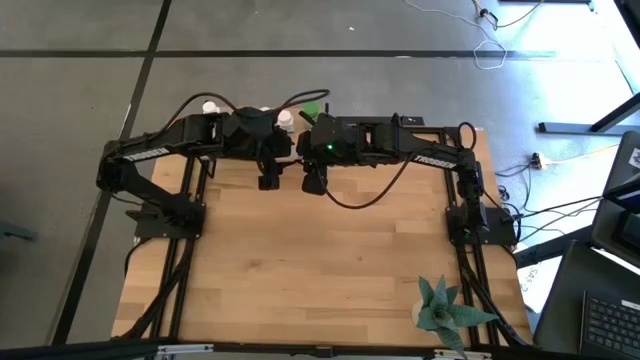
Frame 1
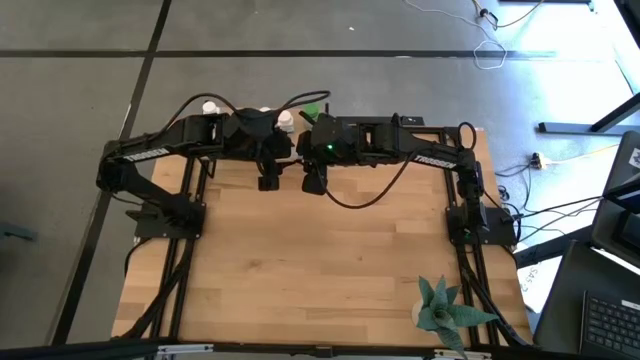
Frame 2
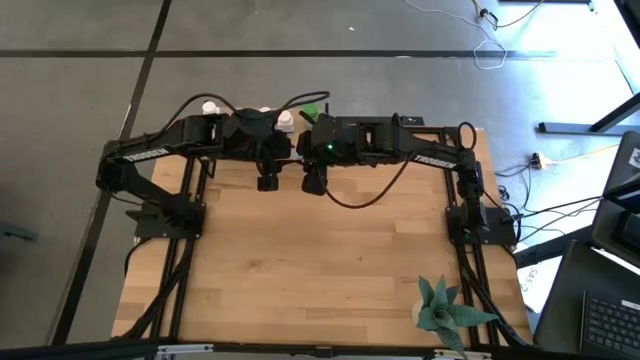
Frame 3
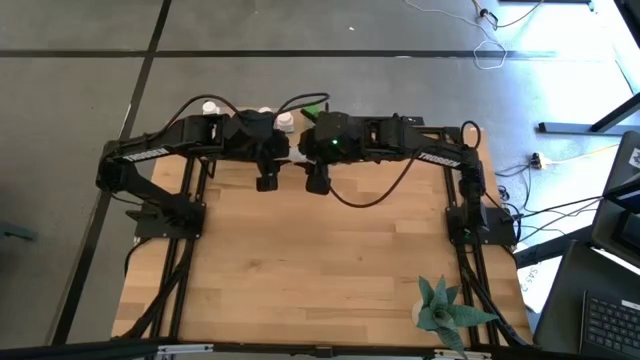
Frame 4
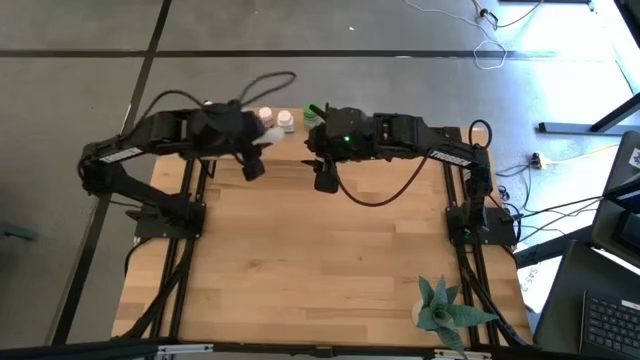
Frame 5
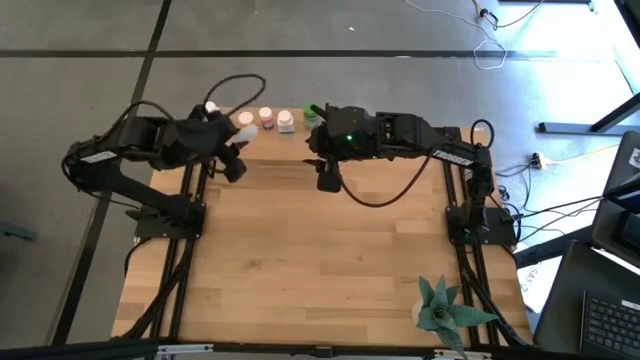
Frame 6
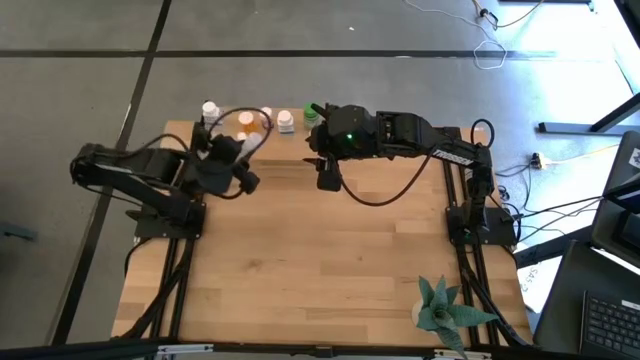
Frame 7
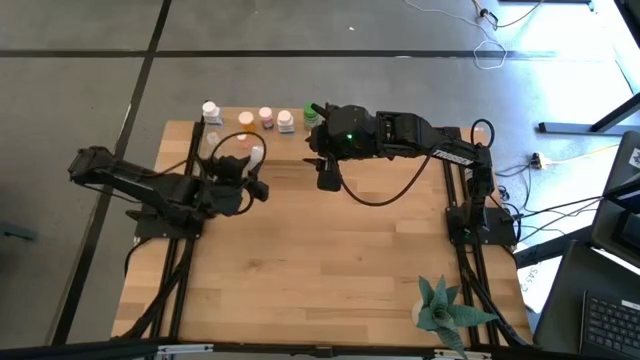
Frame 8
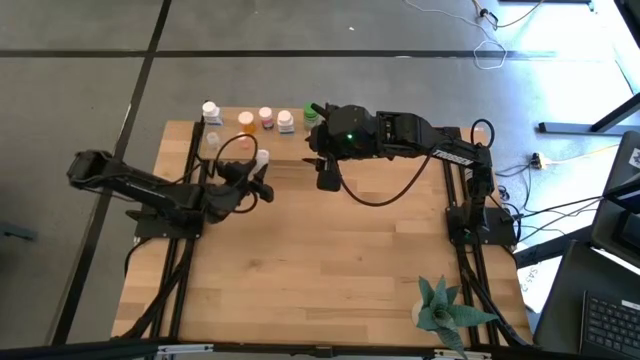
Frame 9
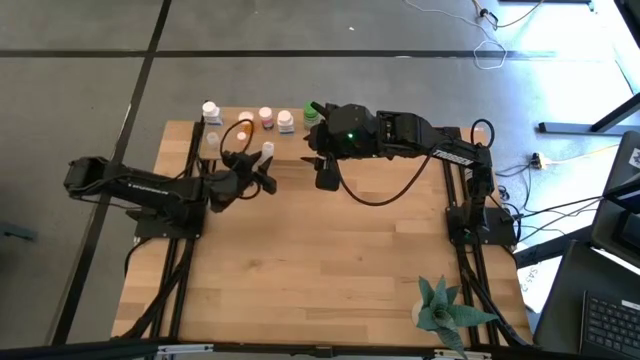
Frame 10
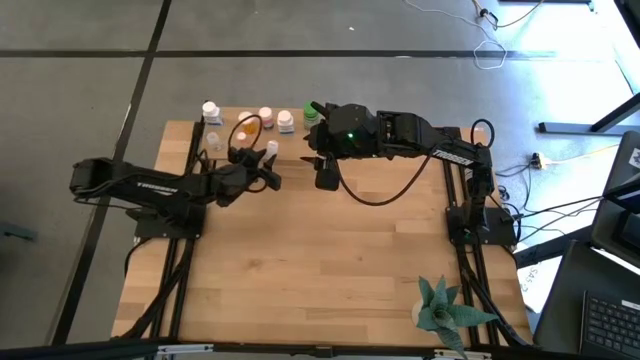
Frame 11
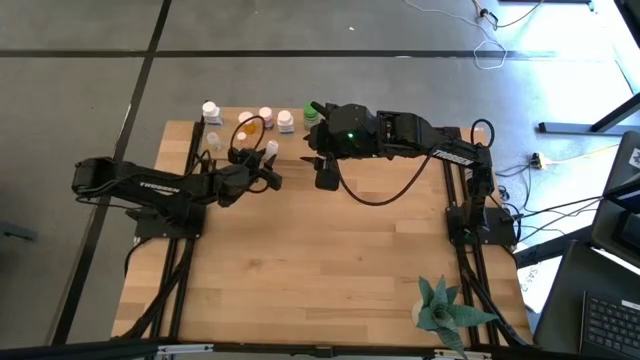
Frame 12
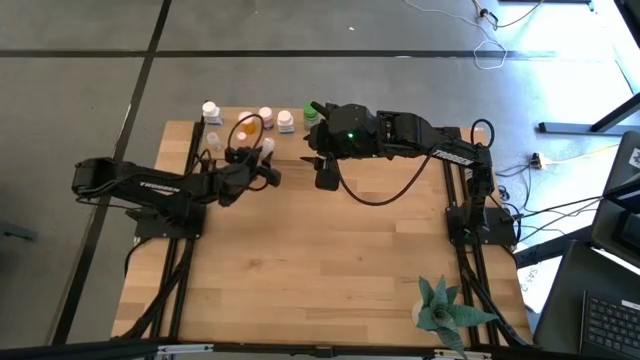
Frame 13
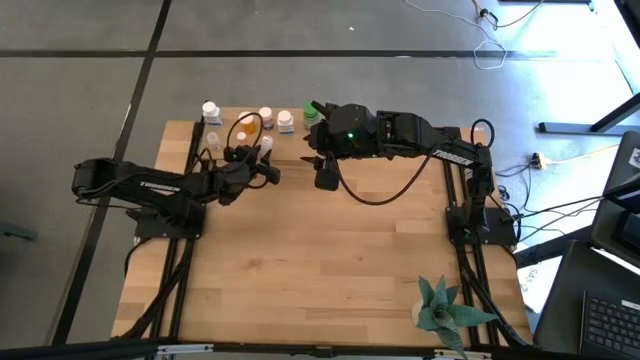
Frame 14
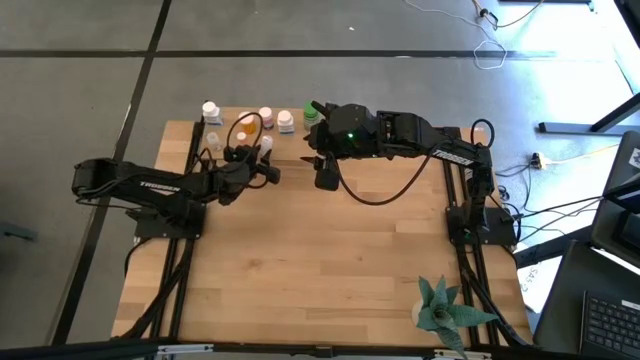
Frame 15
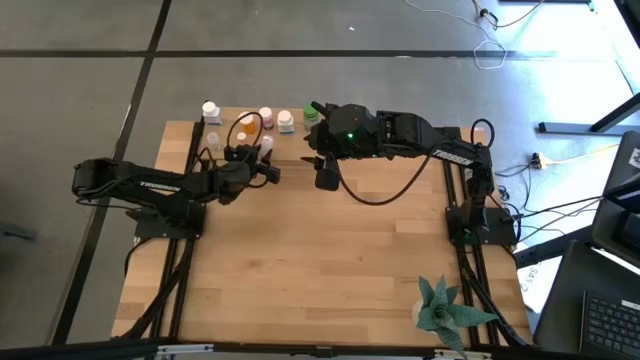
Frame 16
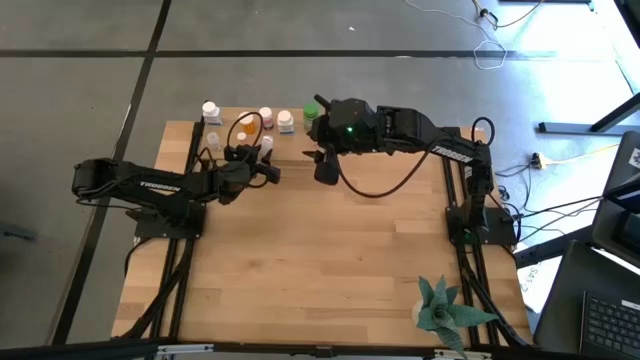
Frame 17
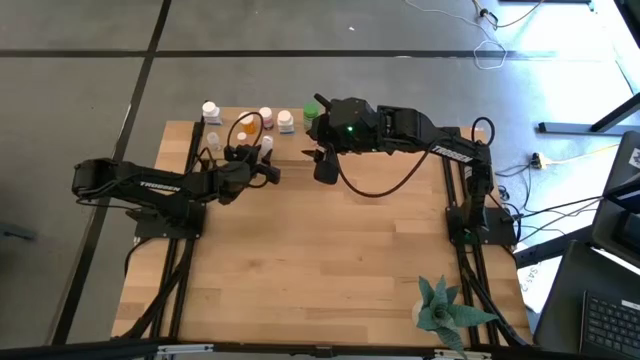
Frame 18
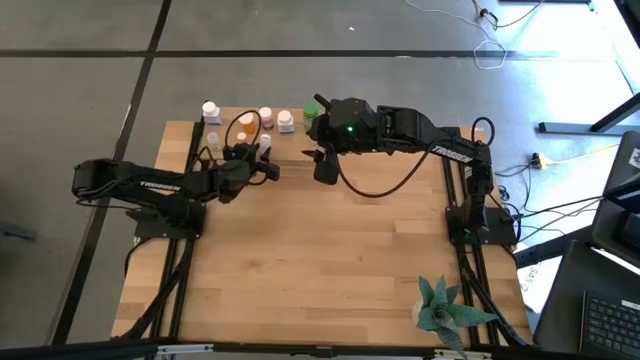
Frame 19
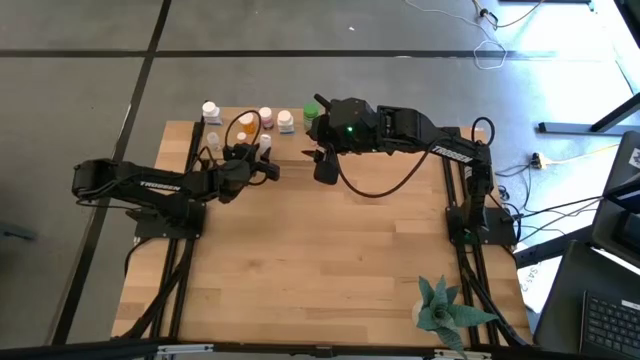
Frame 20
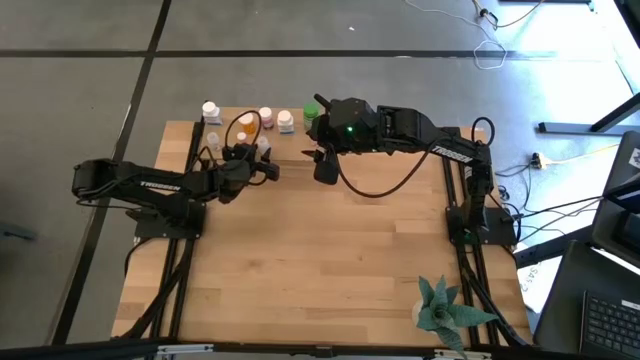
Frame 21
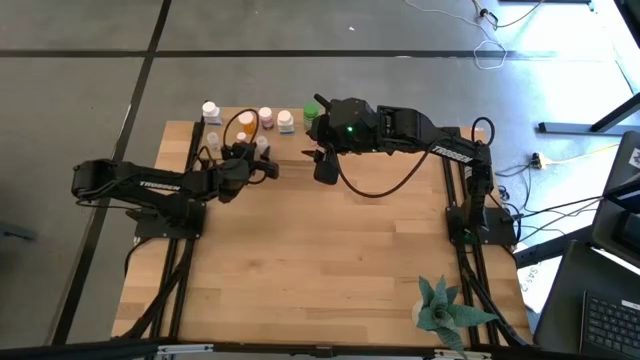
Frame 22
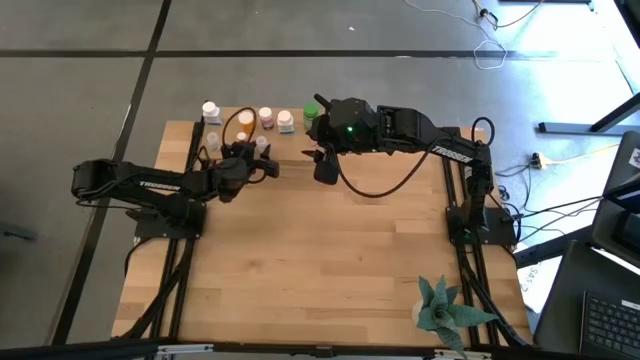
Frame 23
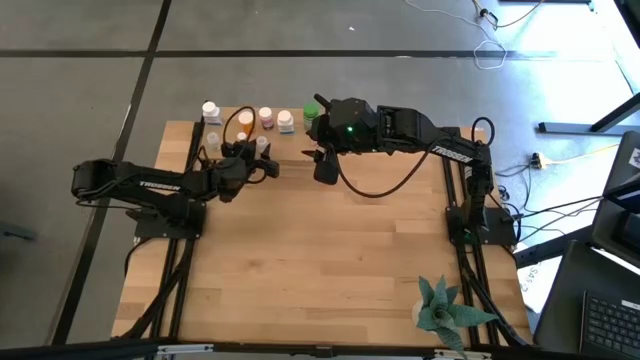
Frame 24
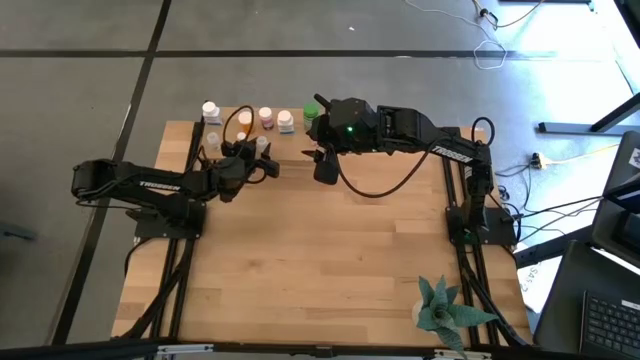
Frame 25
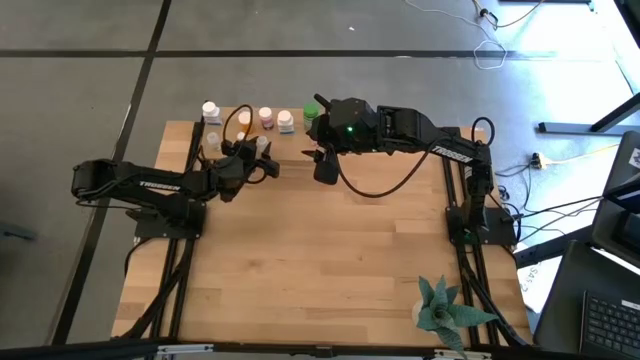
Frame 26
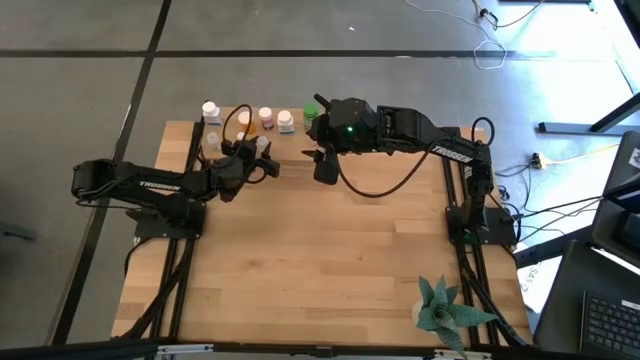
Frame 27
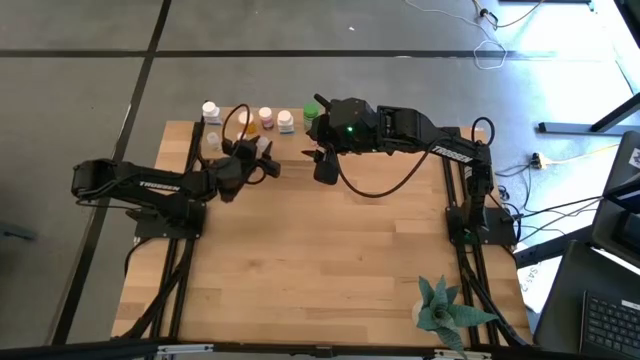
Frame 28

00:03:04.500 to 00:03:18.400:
Task: Pick and place medicine bottles onto shelf by color
Put the transparent pill bottle on the shelf

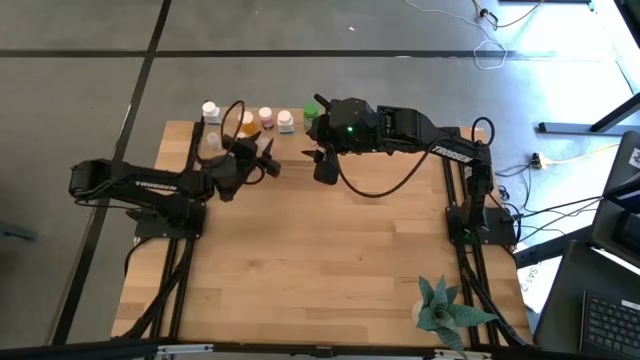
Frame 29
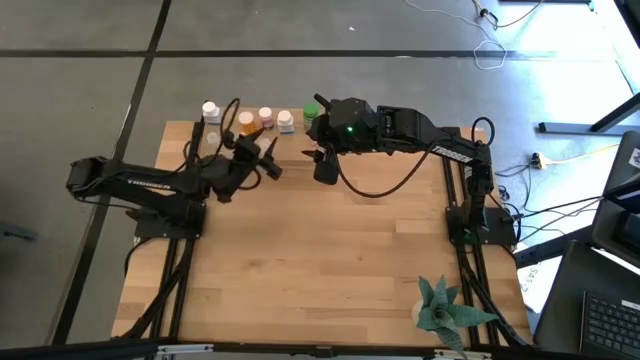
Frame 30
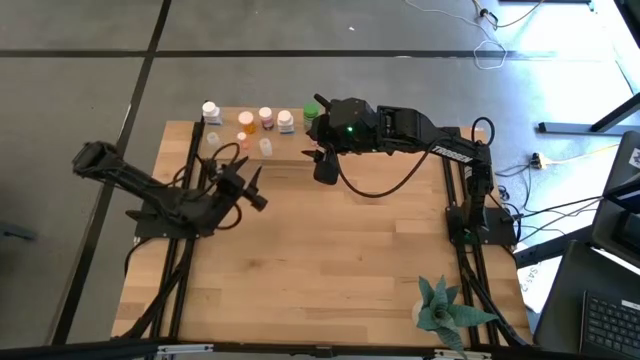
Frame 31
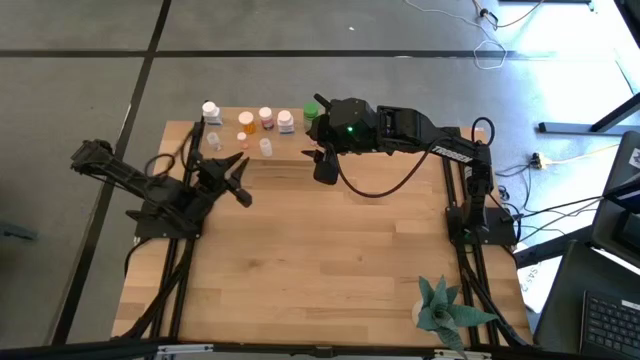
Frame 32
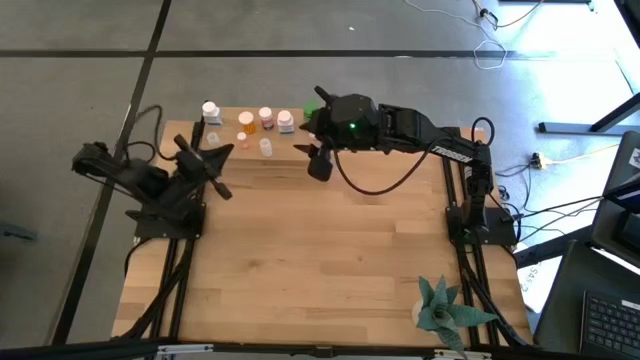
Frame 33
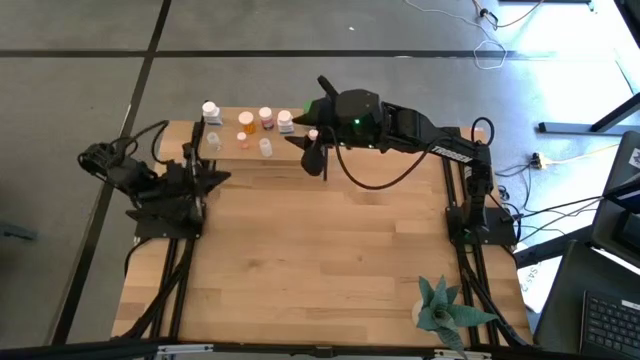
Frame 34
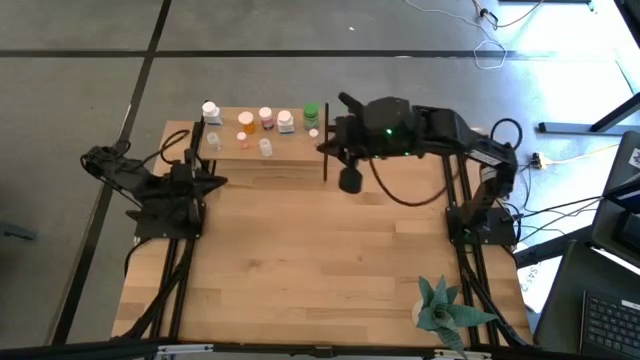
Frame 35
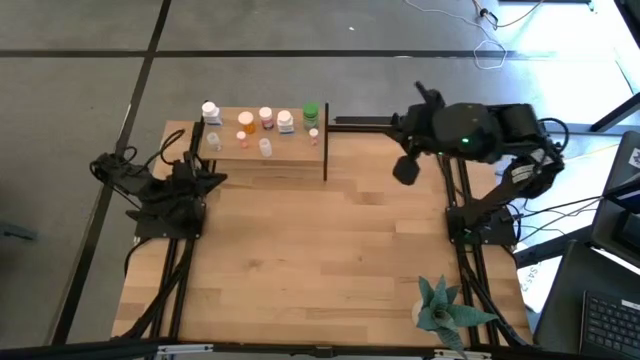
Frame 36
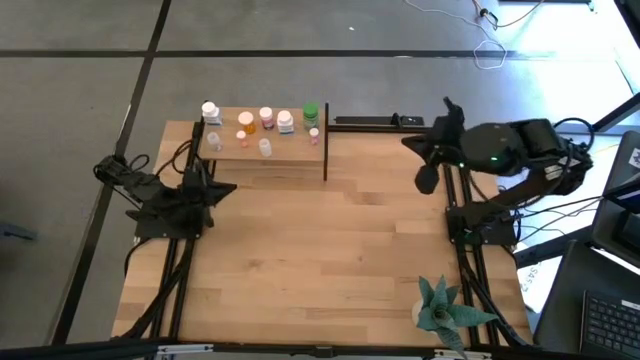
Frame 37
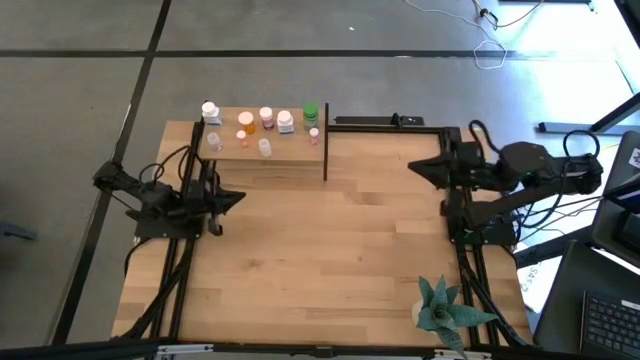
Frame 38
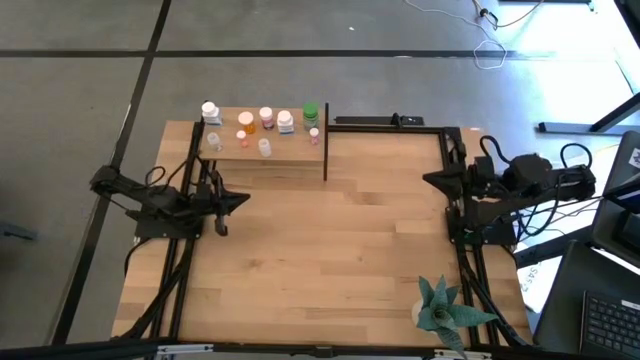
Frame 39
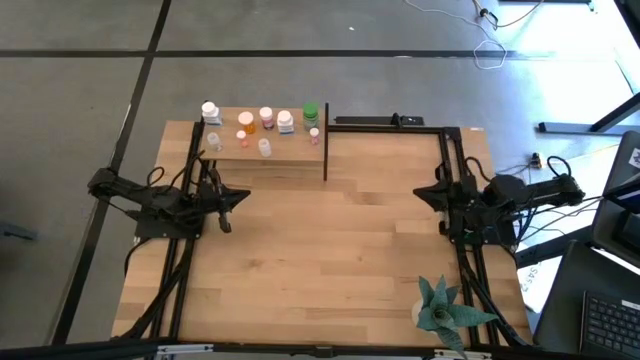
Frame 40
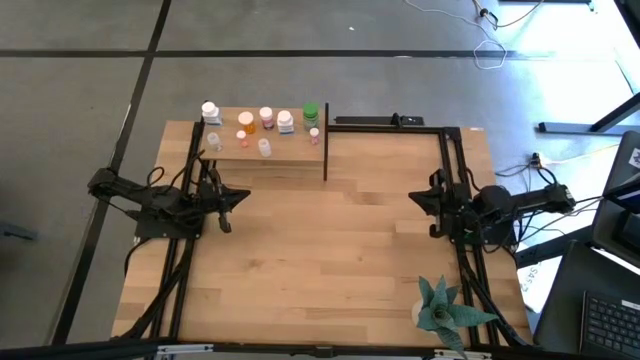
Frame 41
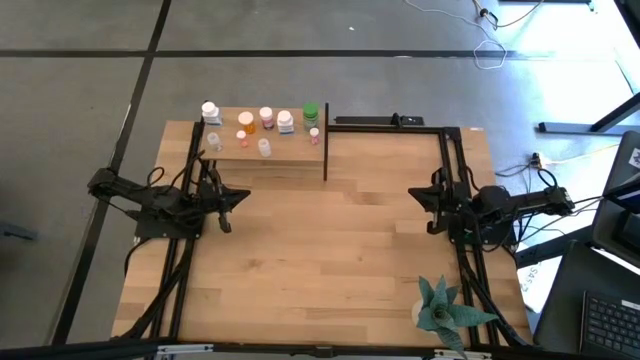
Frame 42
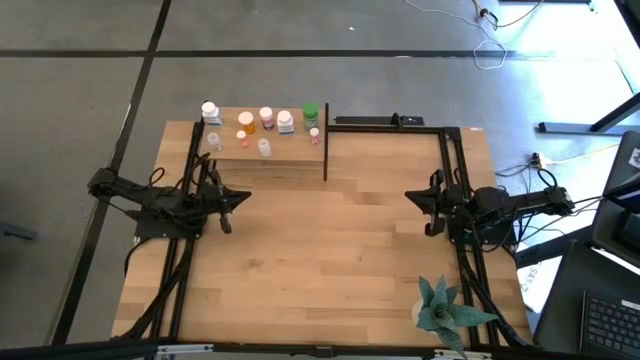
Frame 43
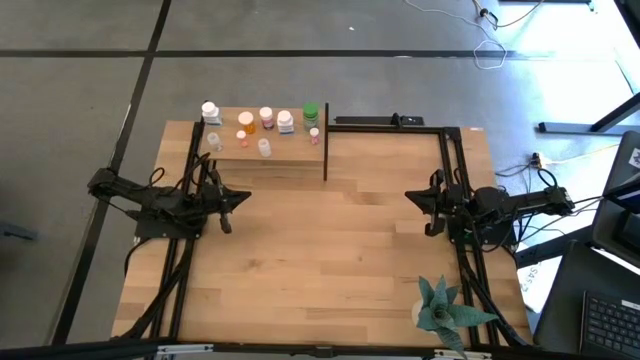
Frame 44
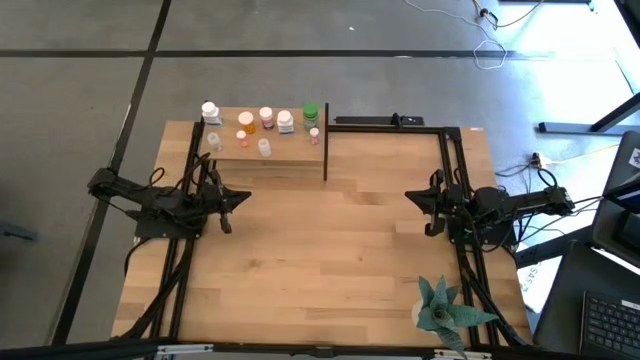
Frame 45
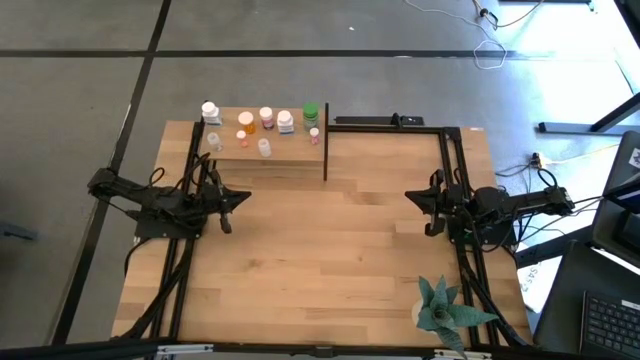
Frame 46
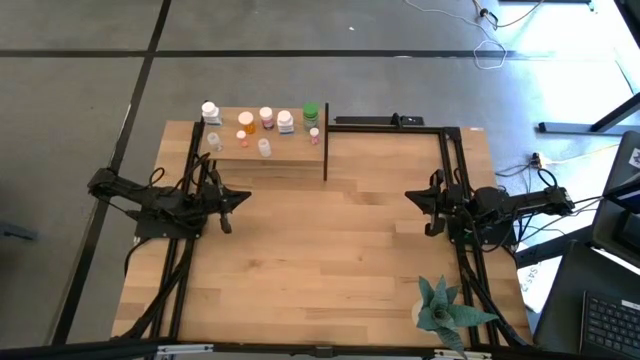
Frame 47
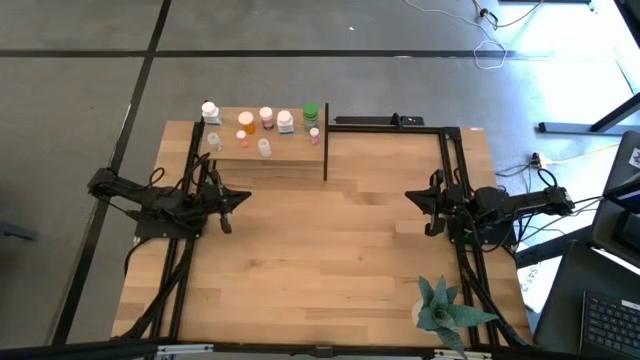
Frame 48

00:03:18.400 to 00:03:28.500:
Return to Home Position
